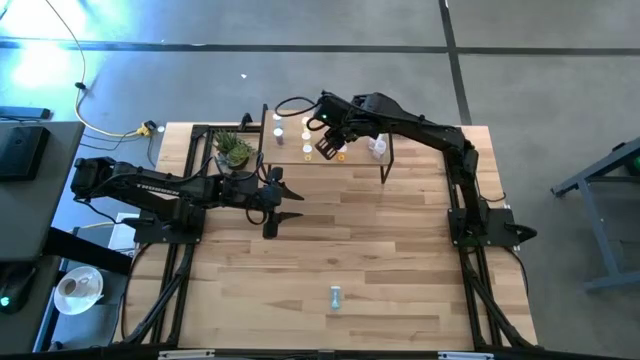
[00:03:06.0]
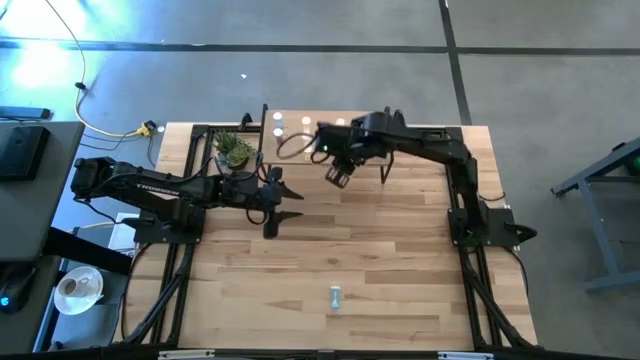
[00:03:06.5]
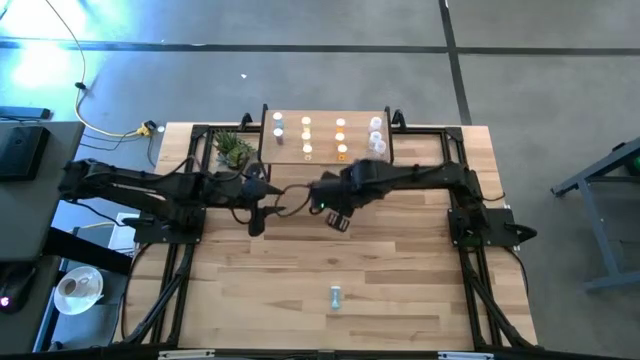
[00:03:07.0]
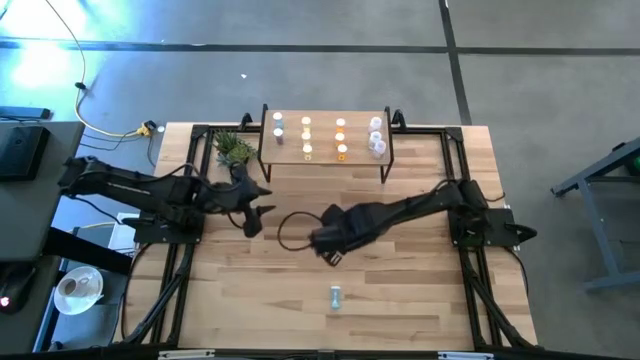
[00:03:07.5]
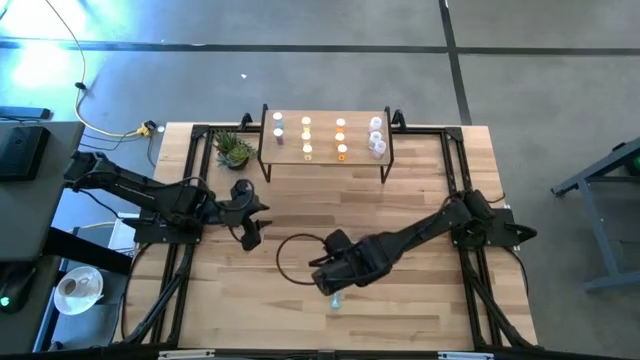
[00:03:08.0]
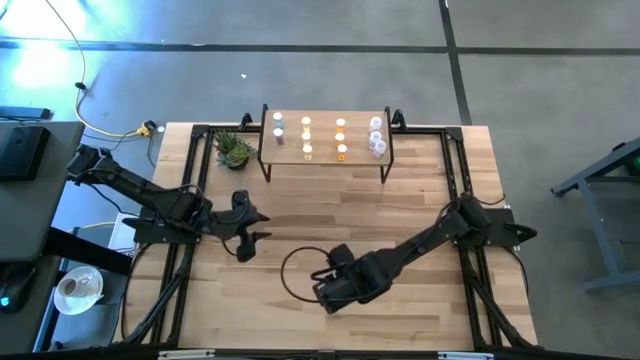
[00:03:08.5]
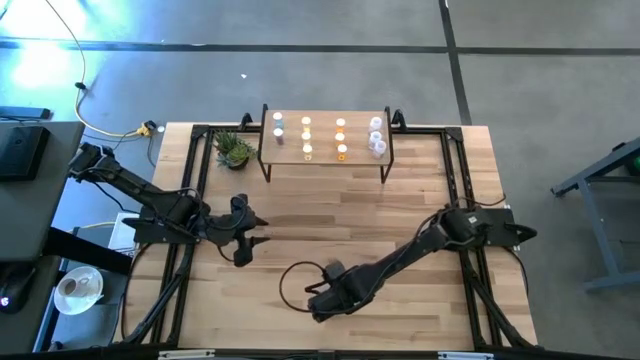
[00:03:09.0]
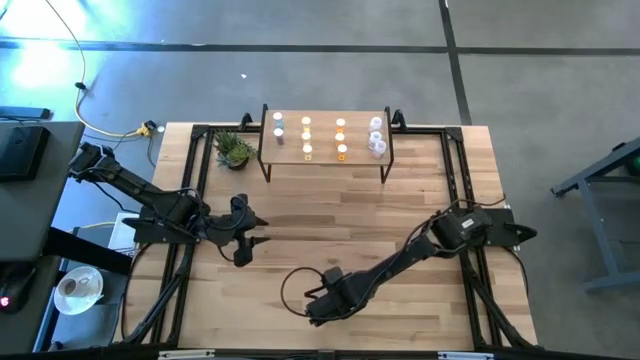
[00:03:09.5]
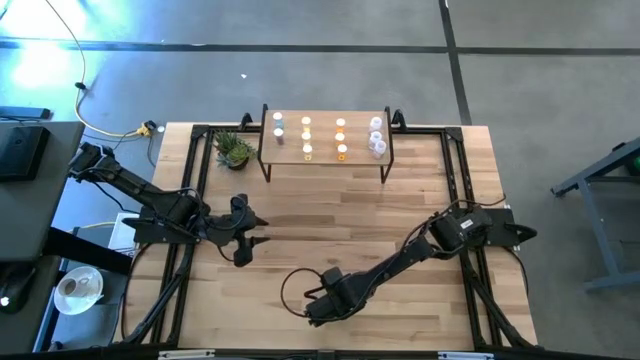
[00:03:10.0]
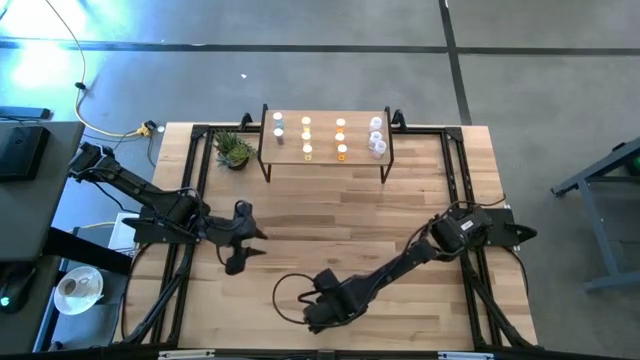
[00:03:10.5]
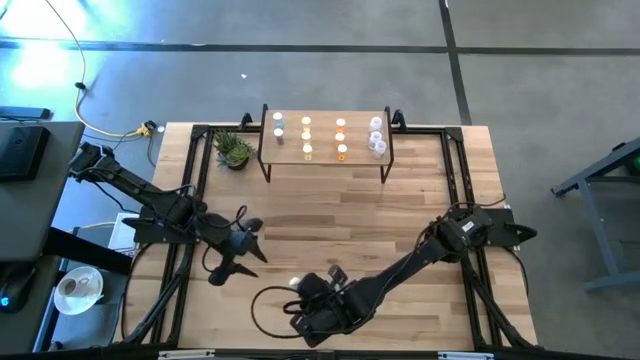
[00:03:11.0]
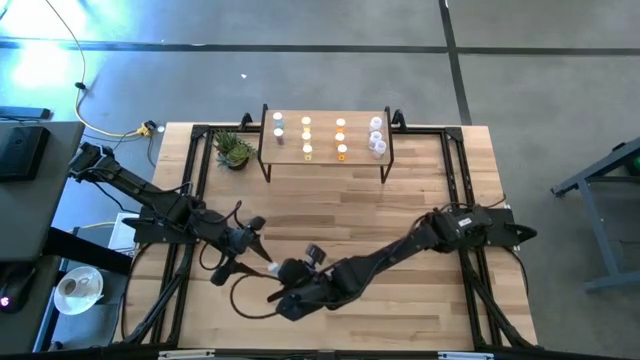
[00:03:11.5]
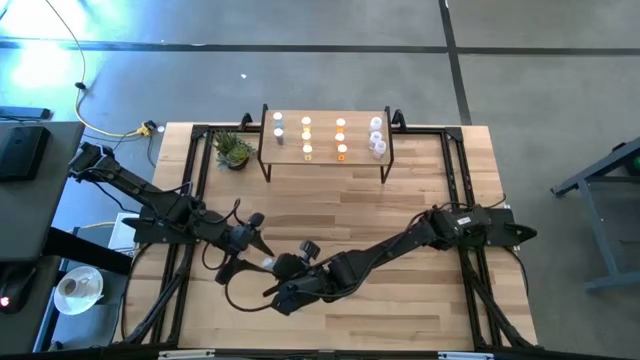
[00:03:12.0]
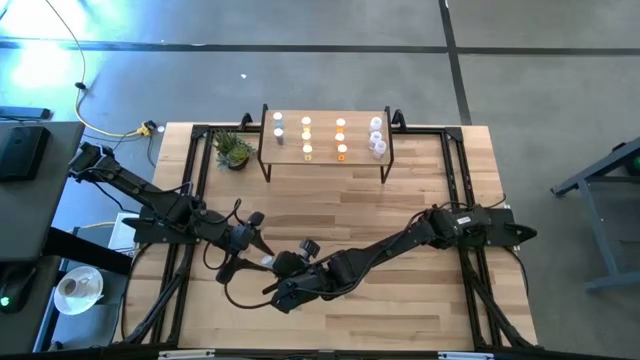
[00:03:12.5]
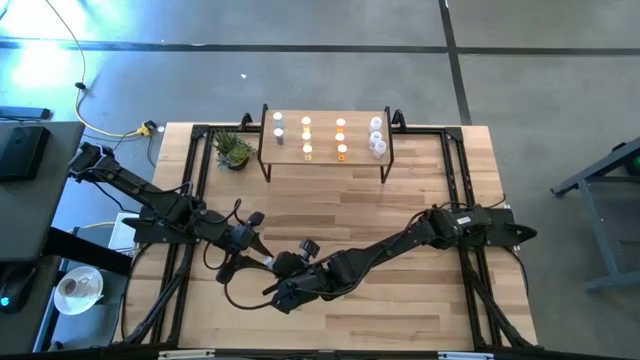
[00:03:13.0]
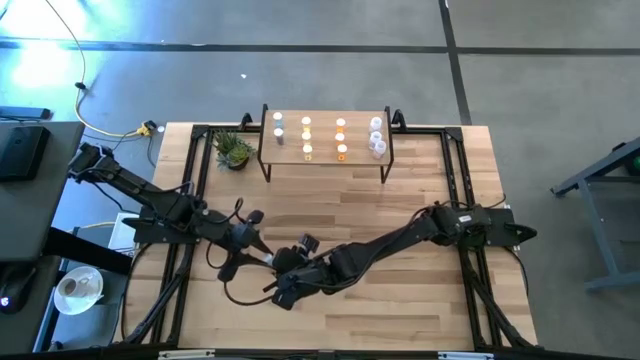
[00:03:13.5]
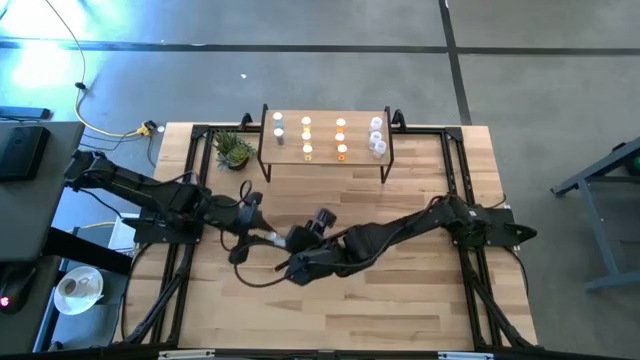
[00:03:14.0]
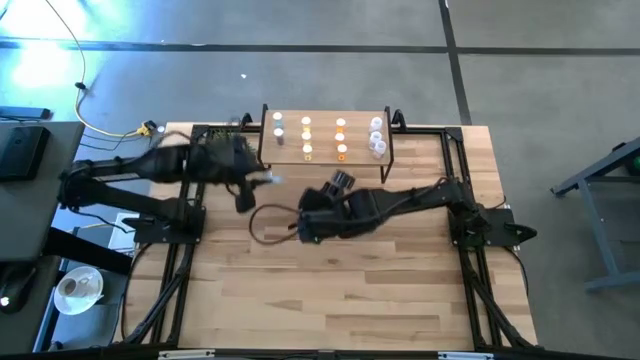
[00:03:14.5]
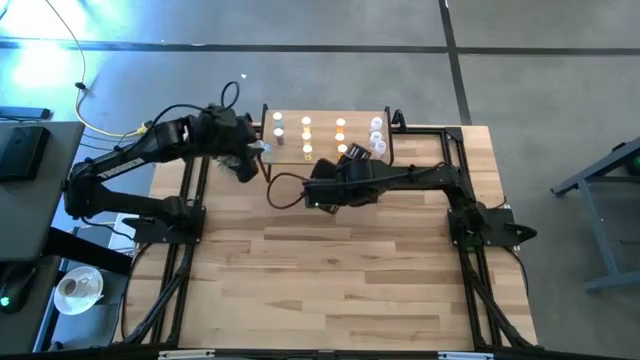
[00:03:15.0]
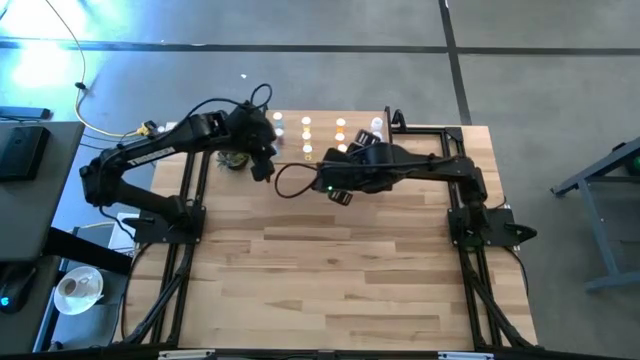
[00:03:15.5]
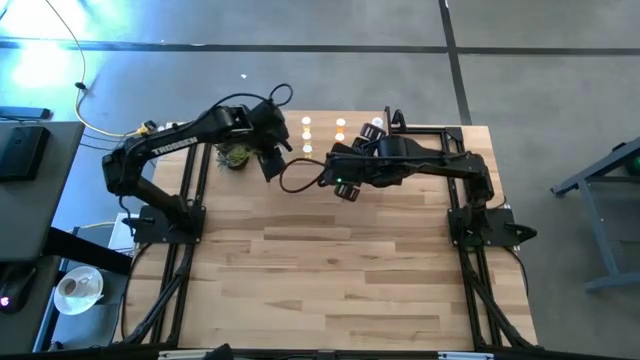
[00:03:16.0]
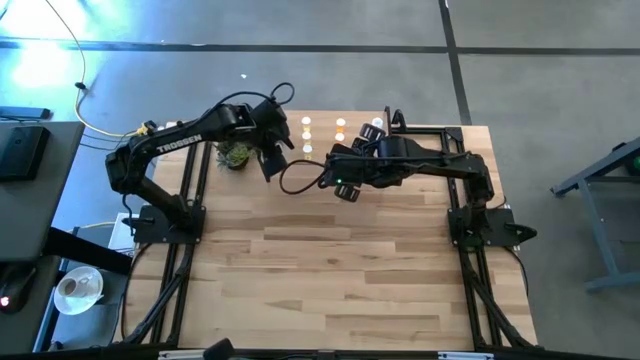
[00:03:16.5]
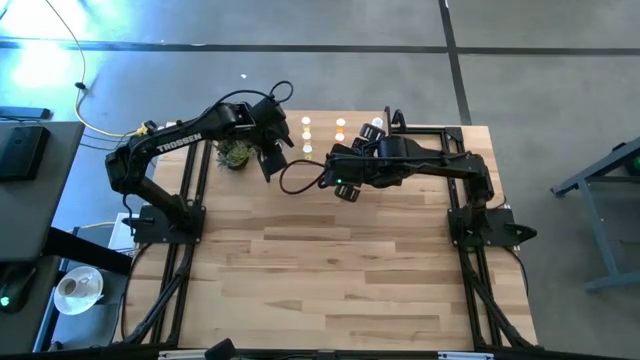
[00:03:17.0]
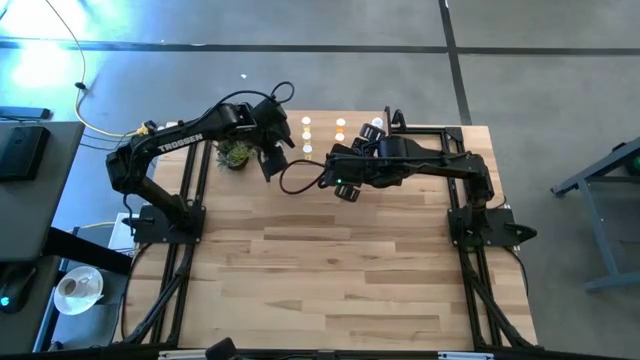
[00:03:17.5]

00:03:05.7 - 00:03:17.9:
Task: Pick and place medicine bottles onto shelf by color
Put the blue pill bottle on the shelf aligned with the blue pill bottles

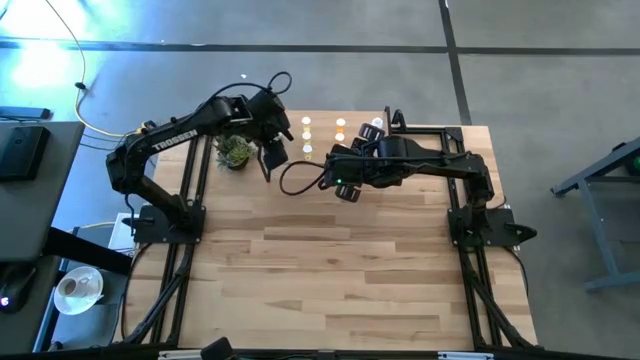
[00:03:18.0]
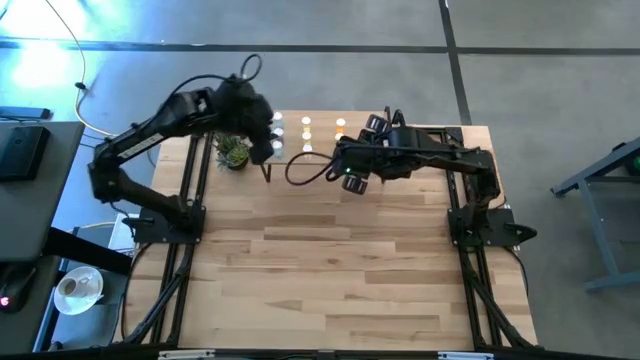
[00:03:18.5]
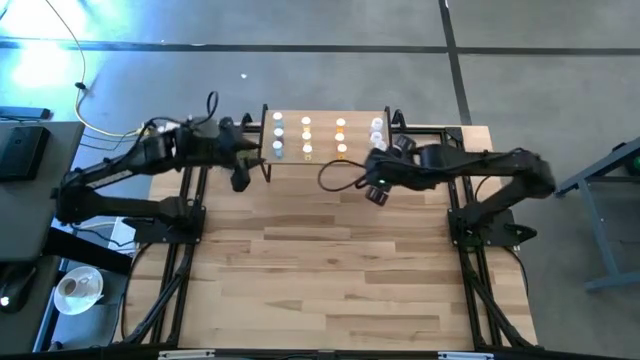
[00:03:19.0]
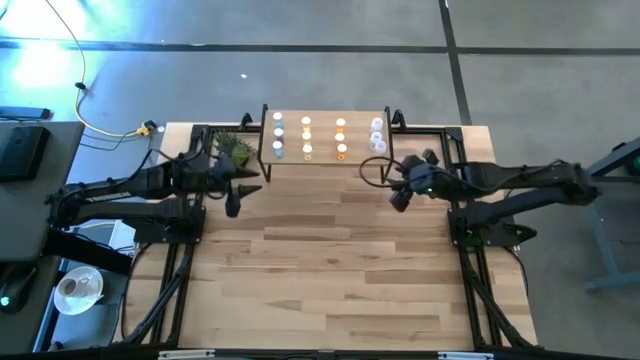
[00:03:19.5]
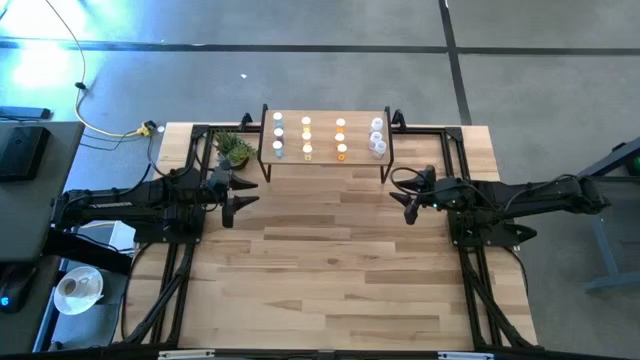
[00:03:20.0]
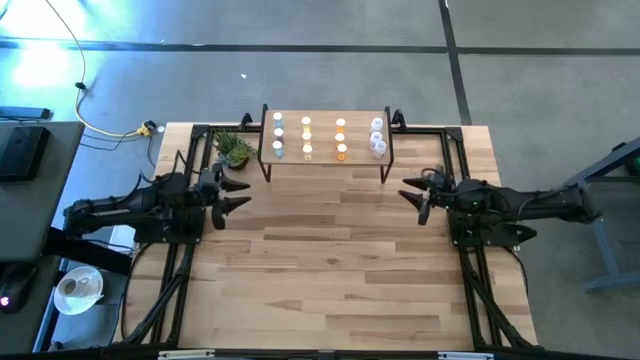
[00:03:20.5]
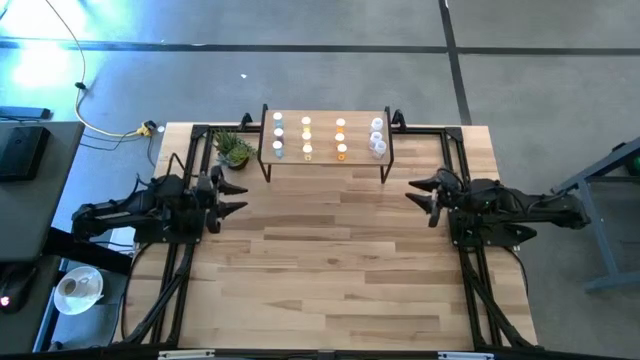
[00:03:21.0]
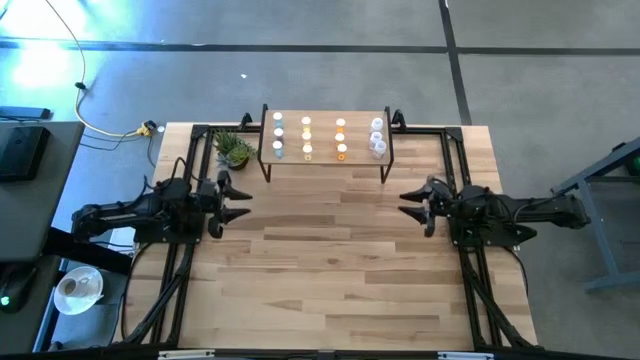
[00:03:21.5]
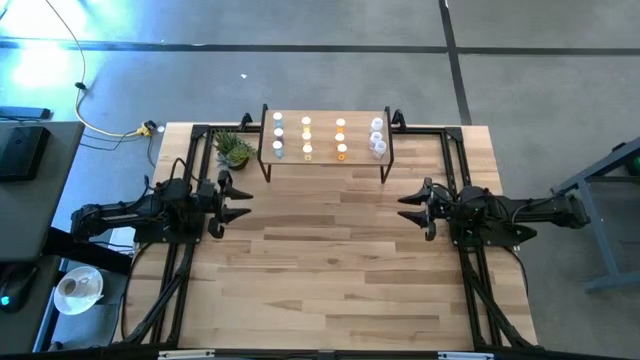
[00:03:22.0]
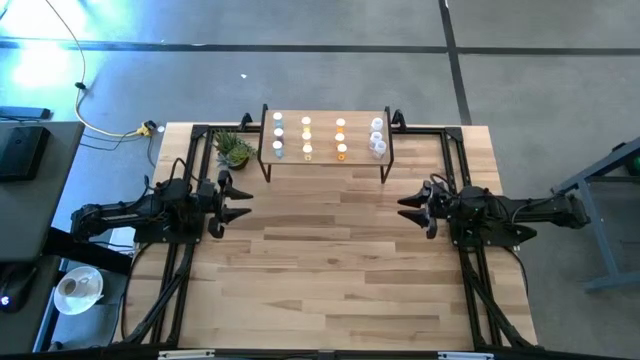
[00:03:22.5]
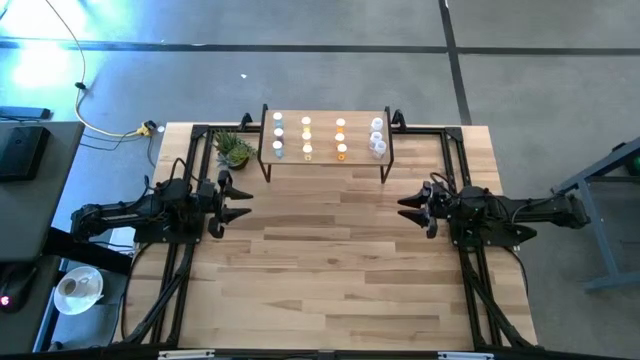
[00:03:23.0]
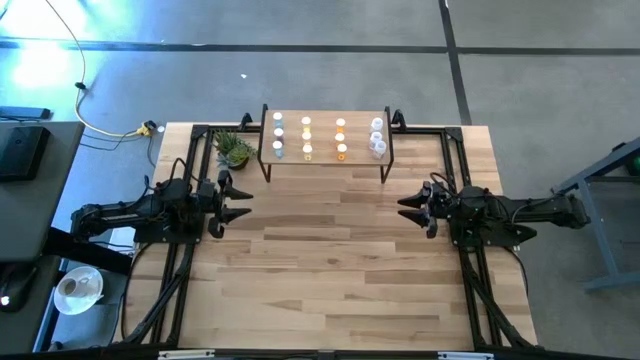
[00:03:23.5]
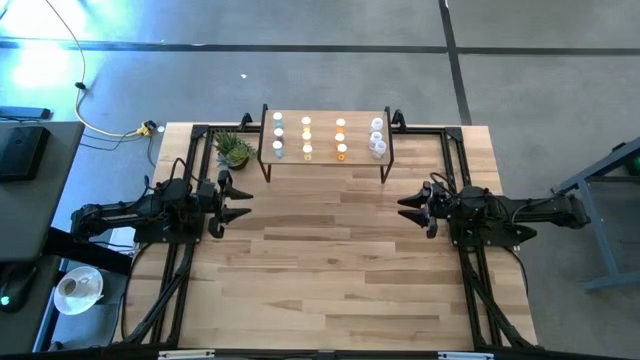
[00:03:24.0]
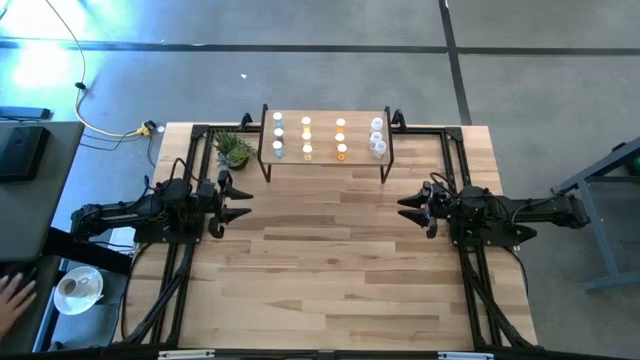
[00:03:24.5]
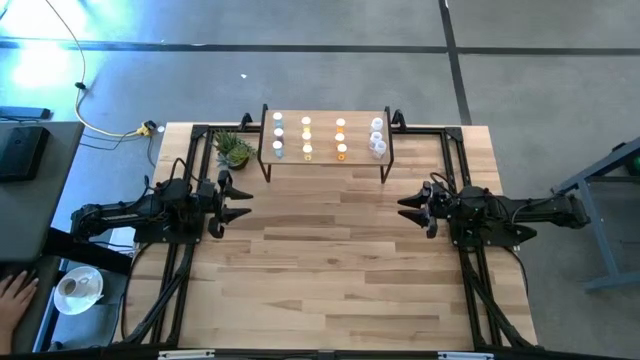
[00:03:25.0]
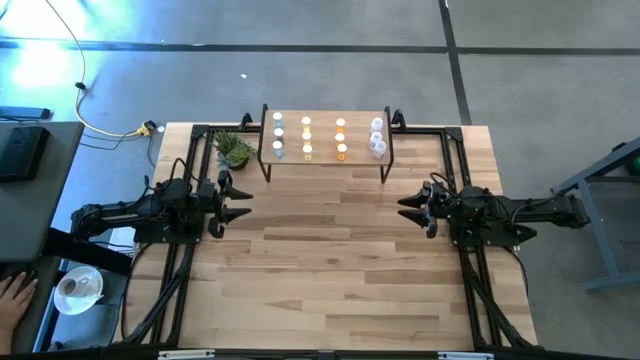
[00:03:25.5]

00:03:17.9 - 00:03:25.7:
Return to Home Position

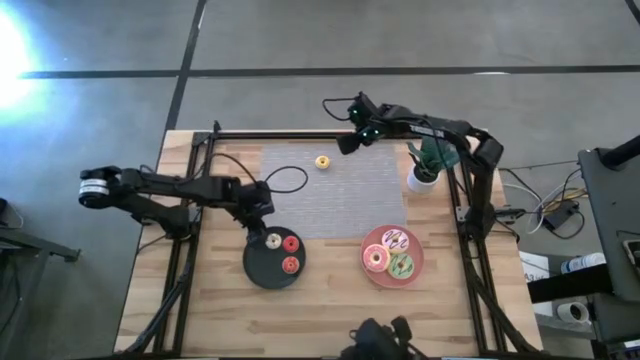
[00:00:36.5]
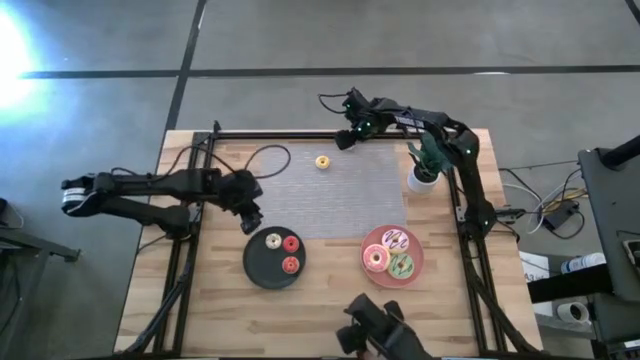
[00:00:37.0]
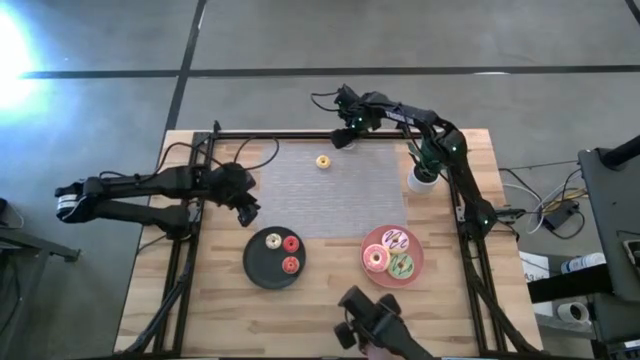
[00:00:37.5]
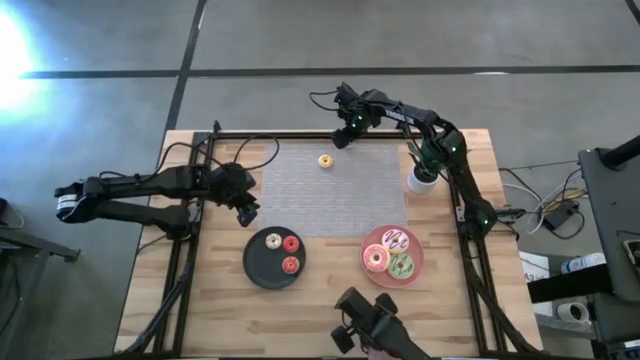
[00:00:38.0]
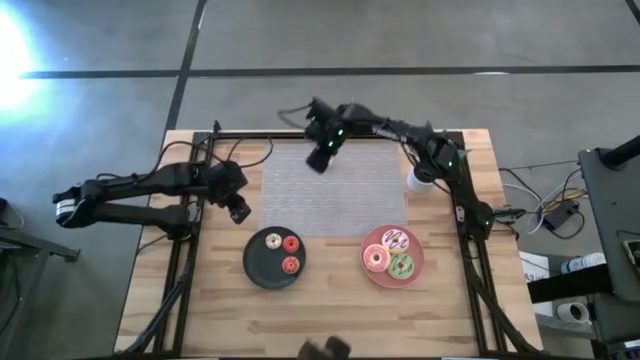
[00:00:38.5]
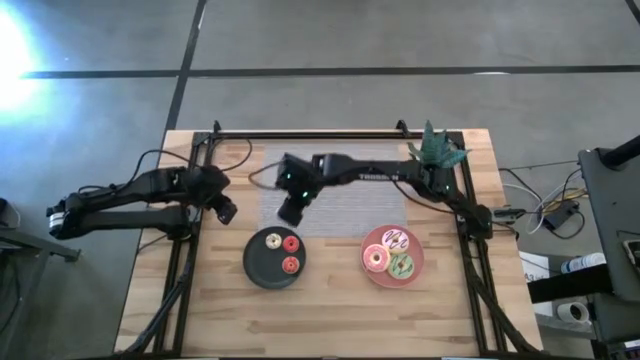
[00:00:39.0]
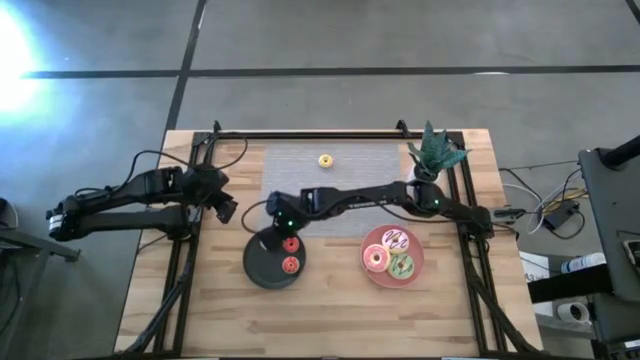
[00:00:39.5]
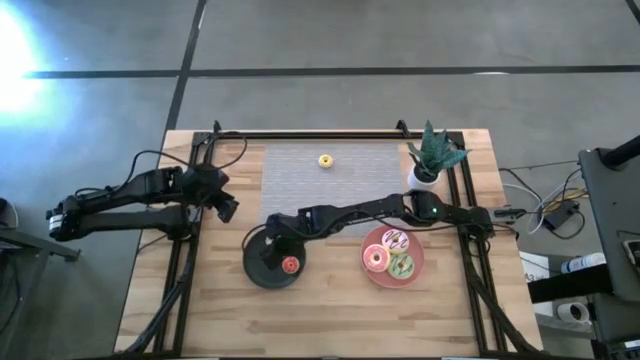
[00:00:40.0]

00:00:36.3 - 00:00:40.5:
Task: Pick & Place donuts
Put the small blue donut on the black plate
